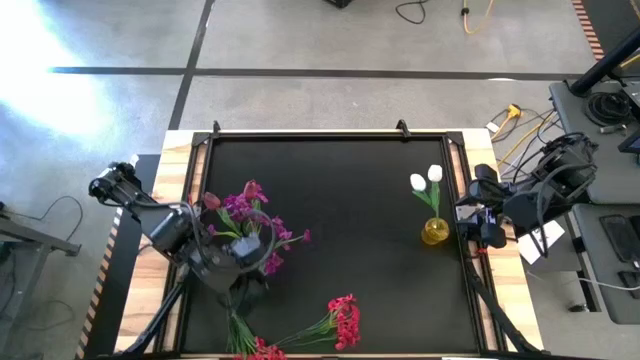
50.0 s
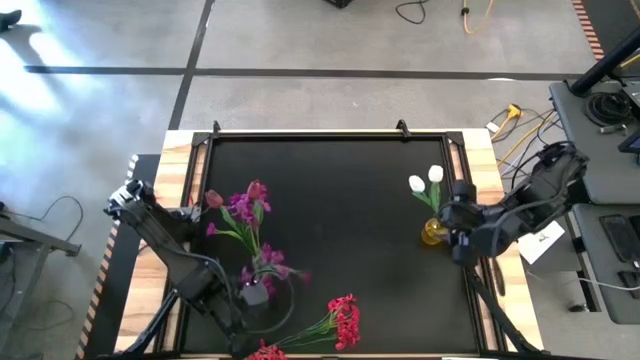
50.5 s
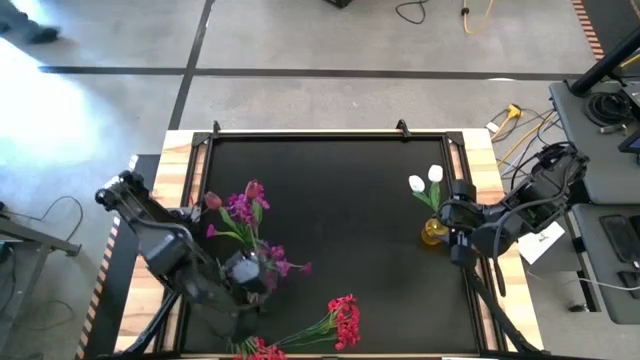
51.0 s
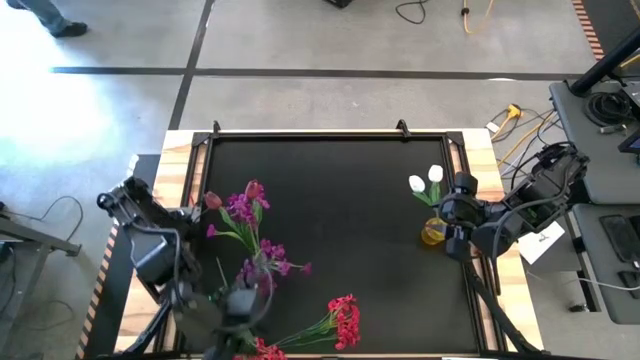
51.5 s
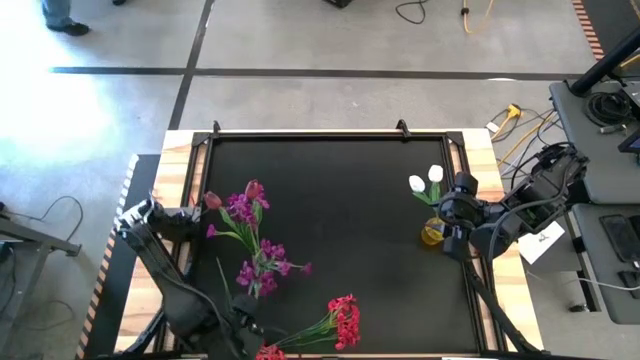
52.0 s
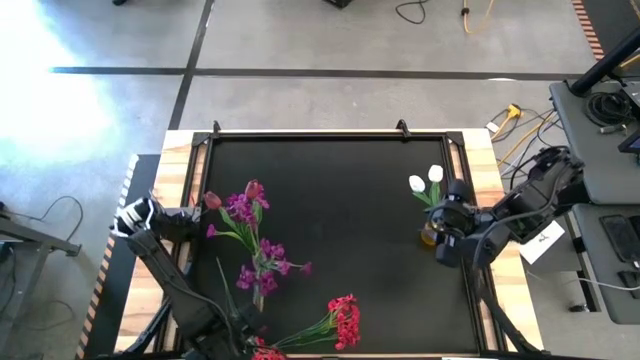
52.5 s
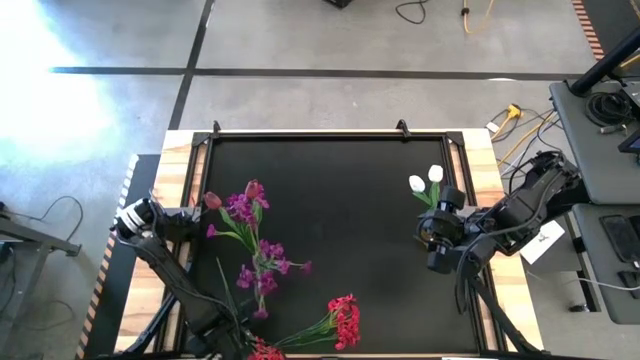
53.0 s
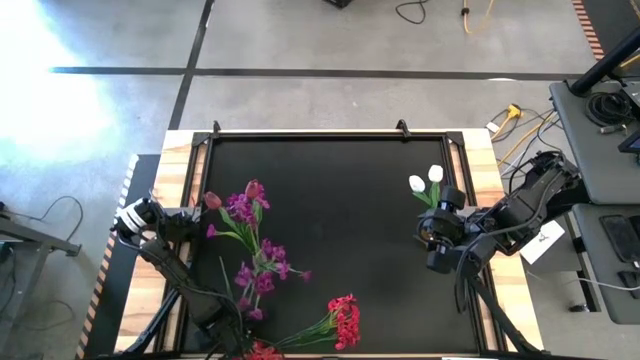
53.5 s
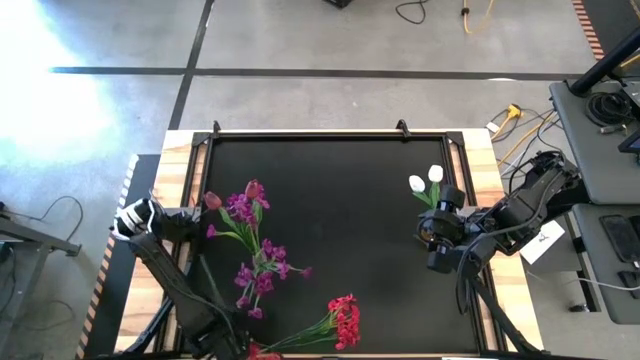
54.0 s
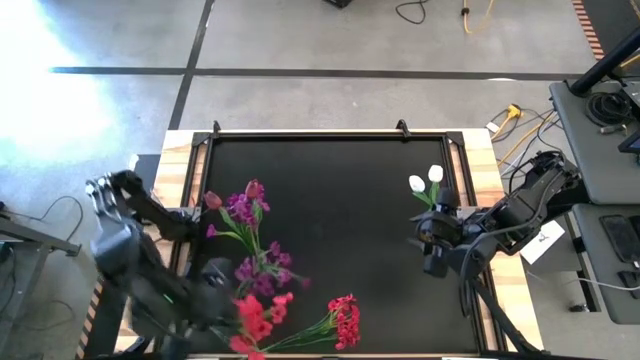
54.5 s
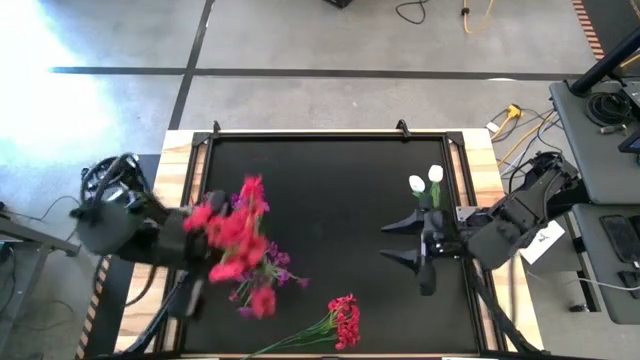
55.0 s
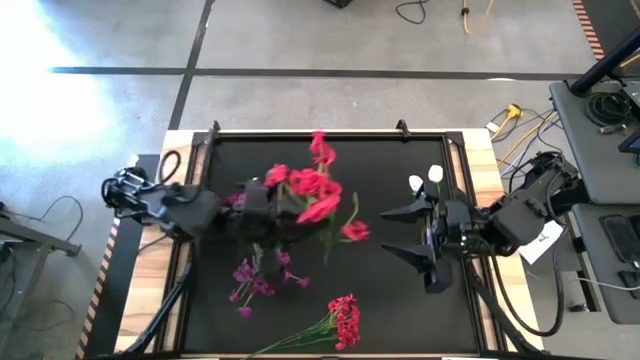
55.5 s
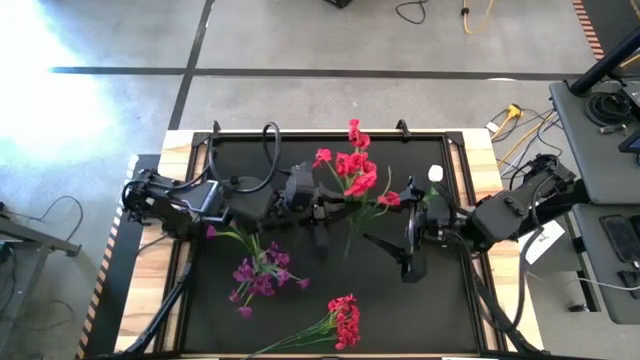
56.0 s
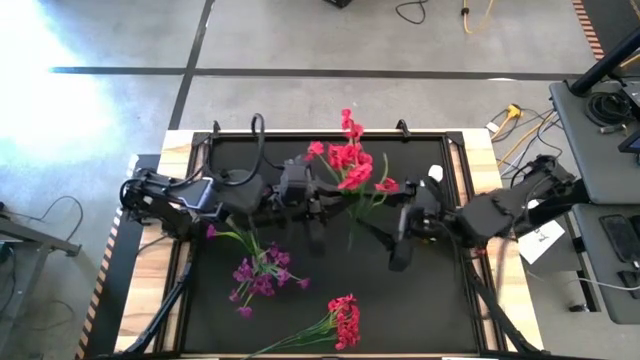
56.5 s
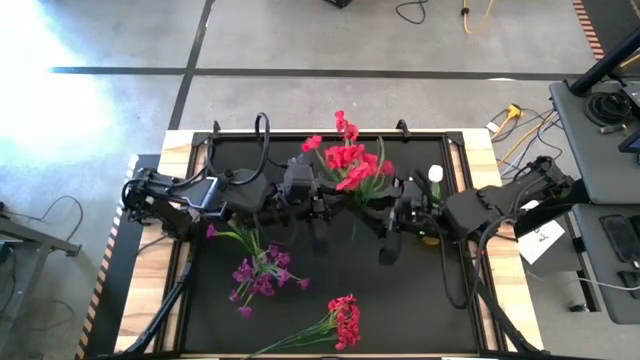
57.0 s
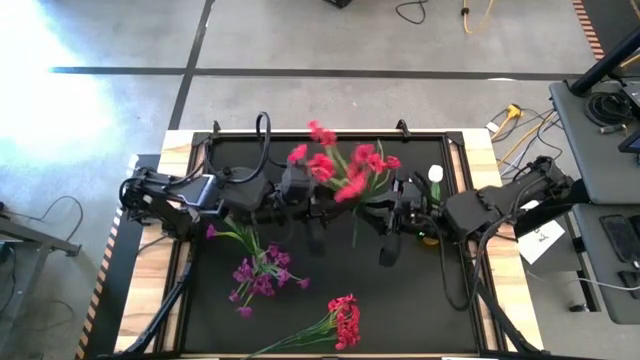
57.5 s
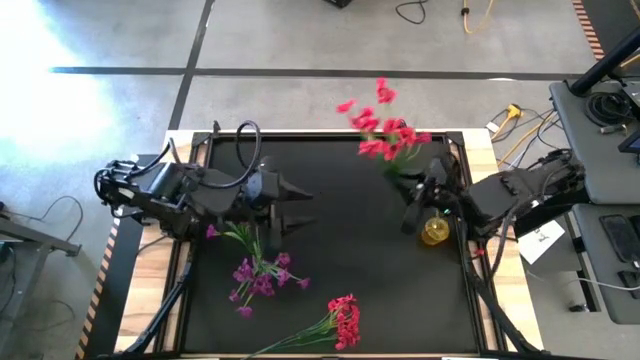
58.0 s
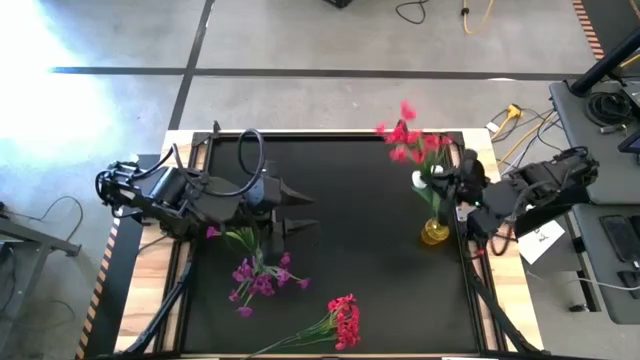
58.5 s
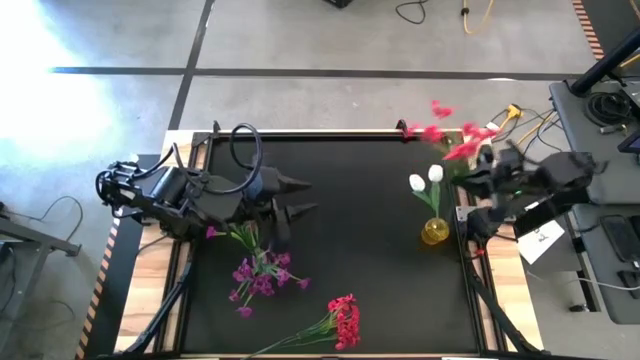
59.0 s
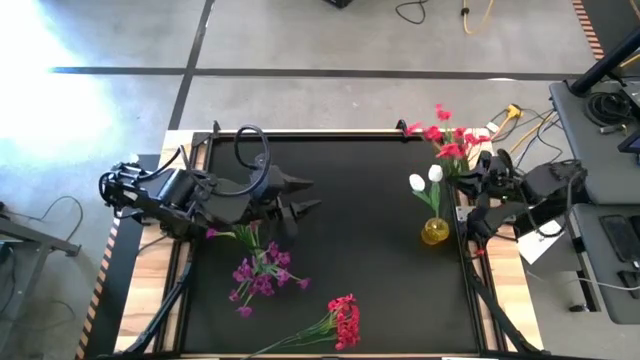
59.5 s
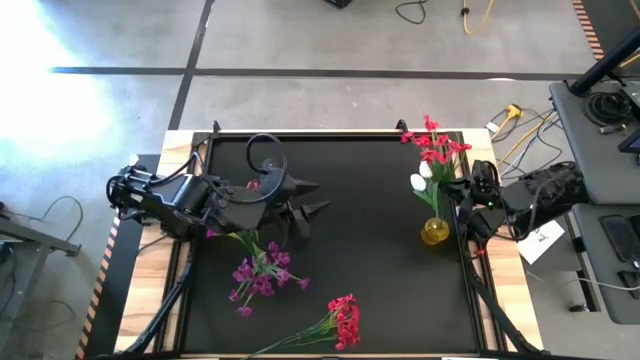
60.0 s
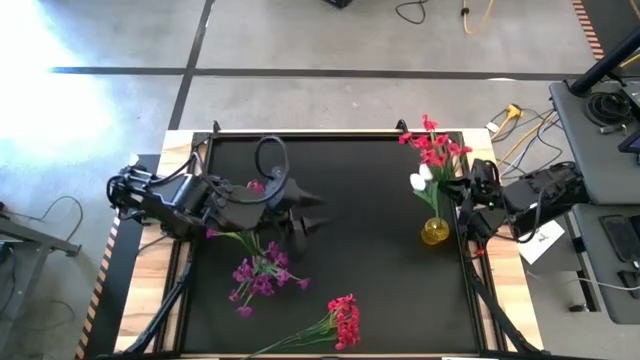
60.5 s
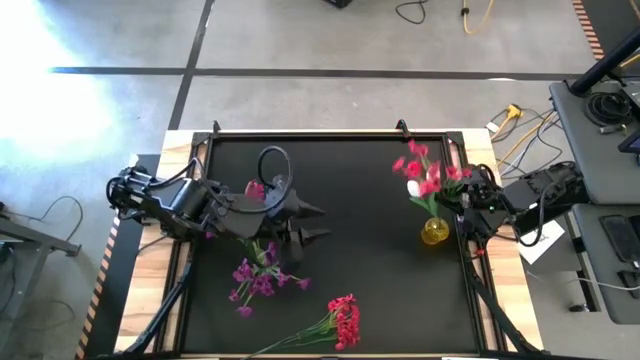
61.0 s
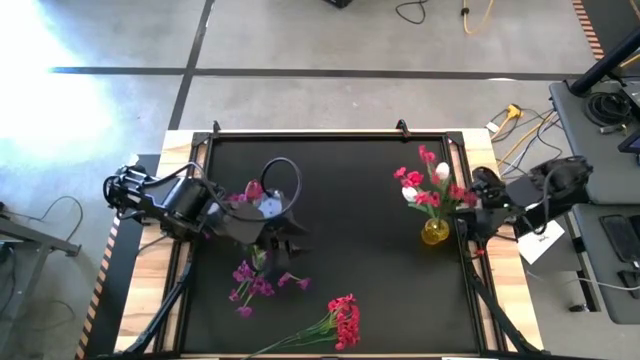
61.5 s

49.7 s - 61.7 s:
Task: Sort flowers into vase by color
Put the left red flower into the yellow flower vase

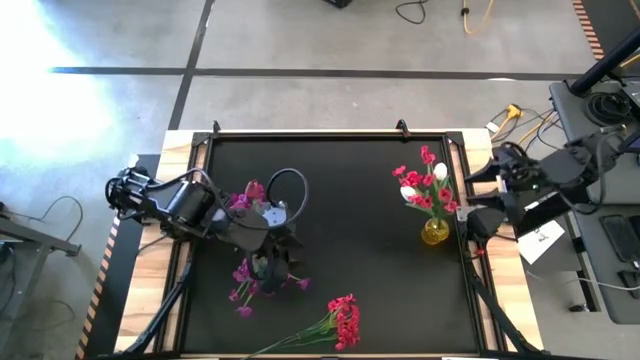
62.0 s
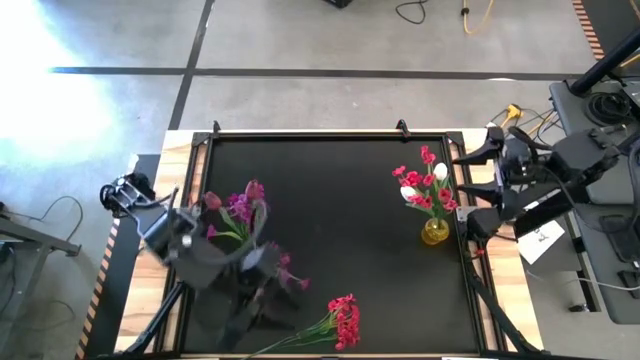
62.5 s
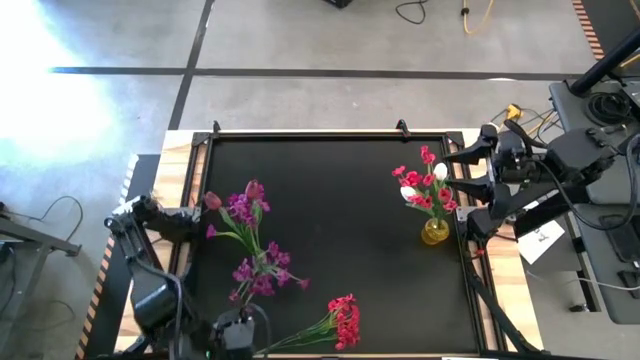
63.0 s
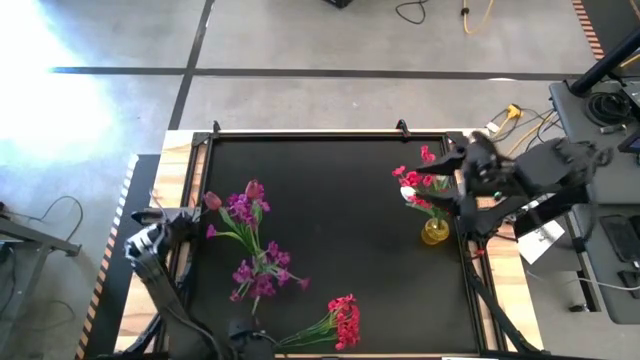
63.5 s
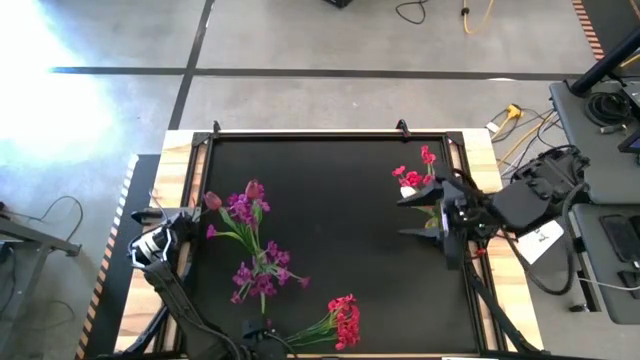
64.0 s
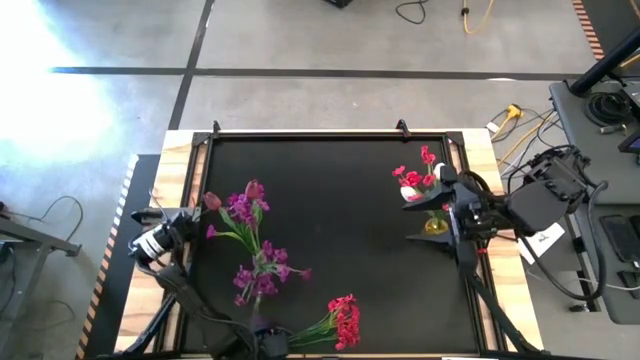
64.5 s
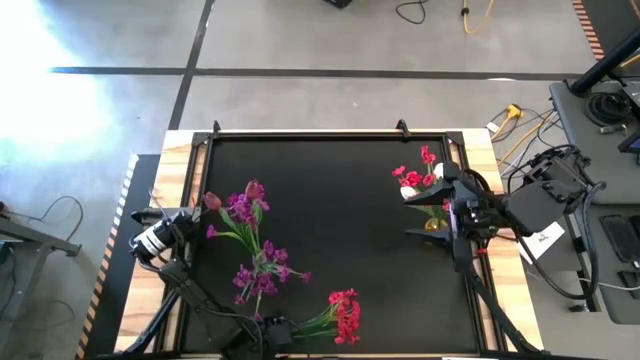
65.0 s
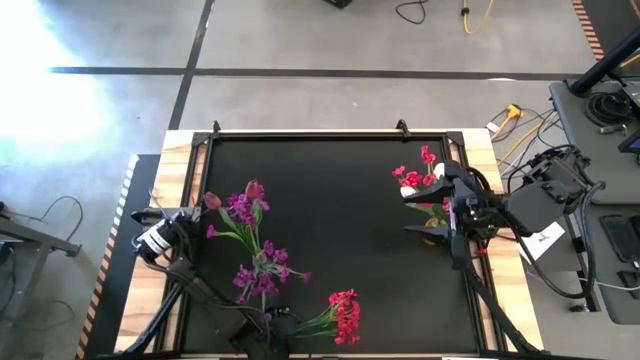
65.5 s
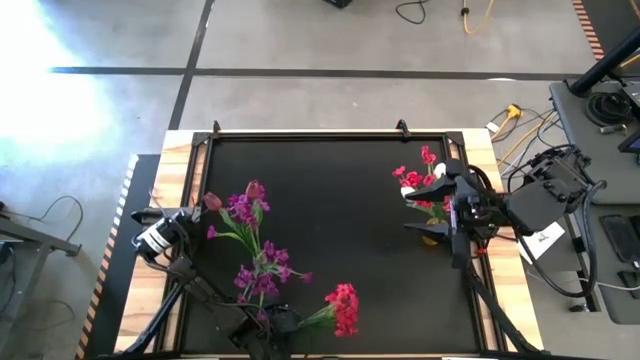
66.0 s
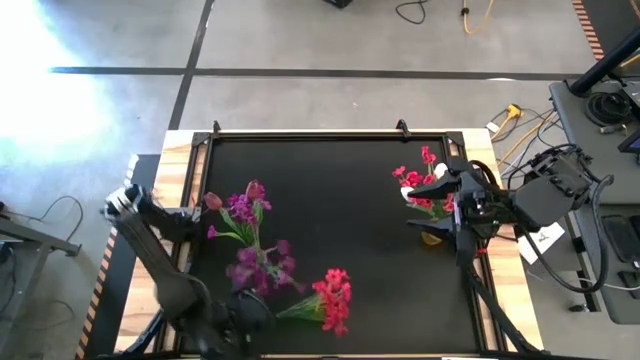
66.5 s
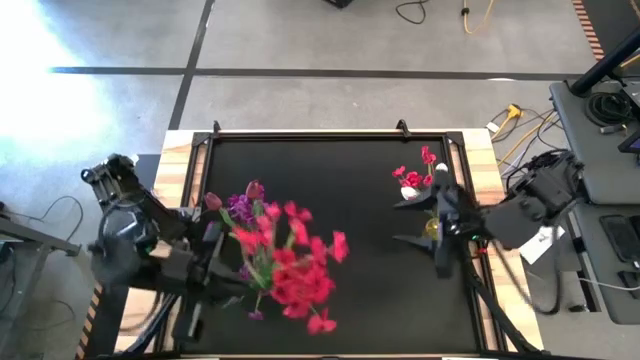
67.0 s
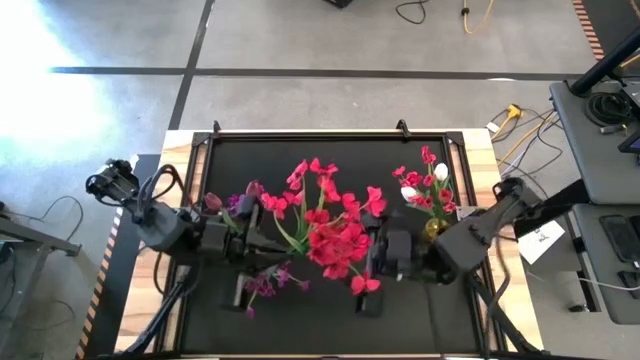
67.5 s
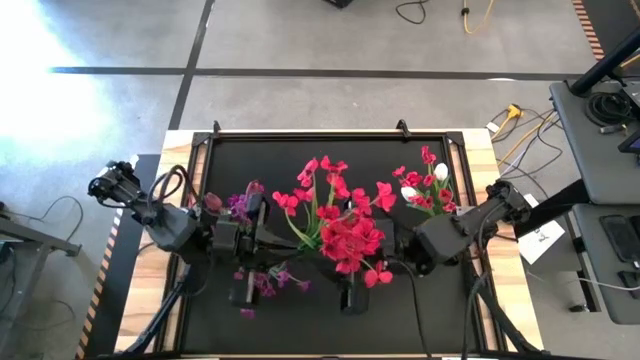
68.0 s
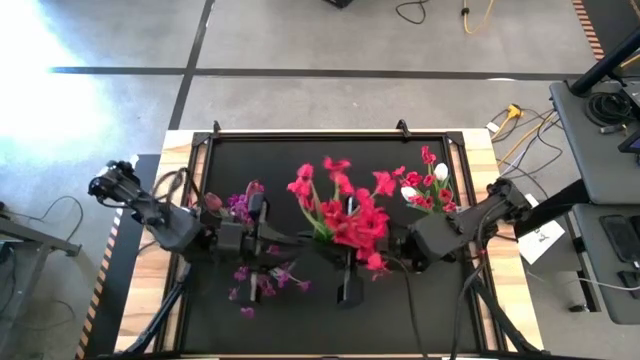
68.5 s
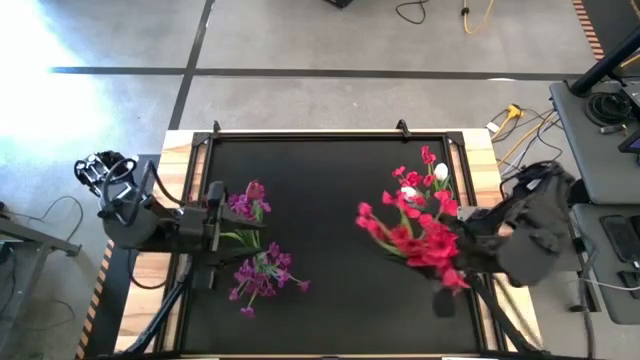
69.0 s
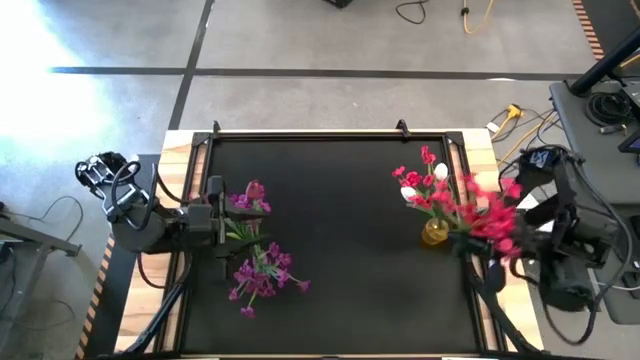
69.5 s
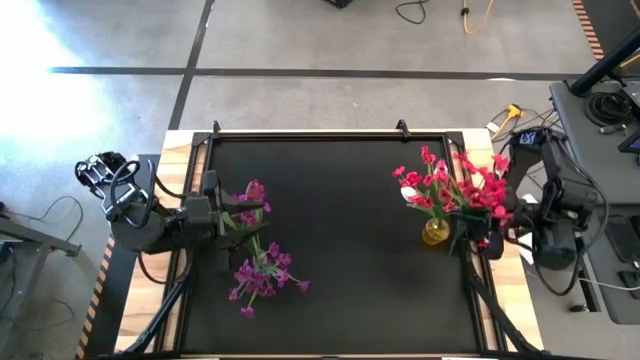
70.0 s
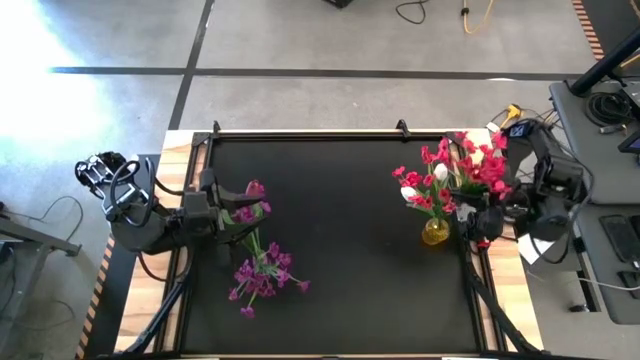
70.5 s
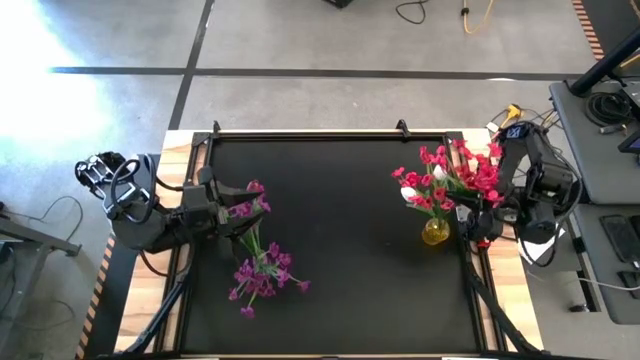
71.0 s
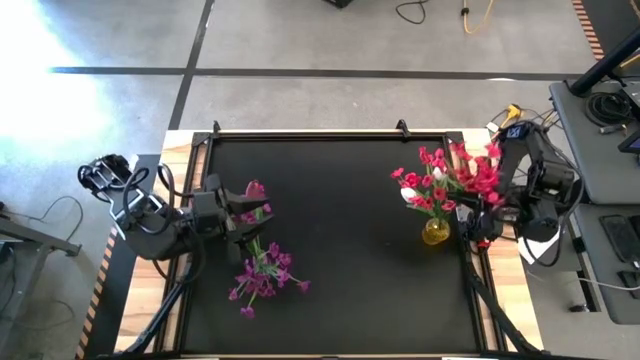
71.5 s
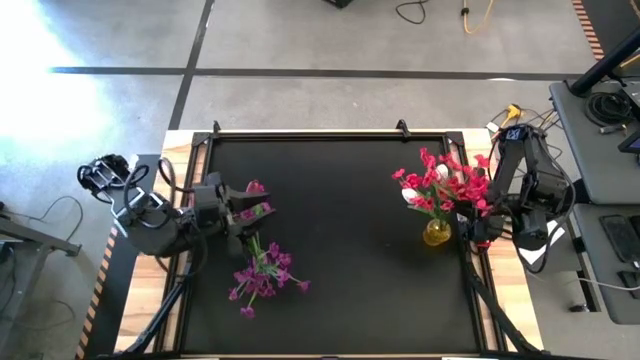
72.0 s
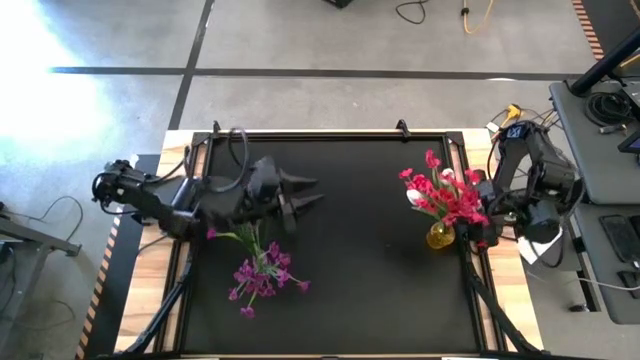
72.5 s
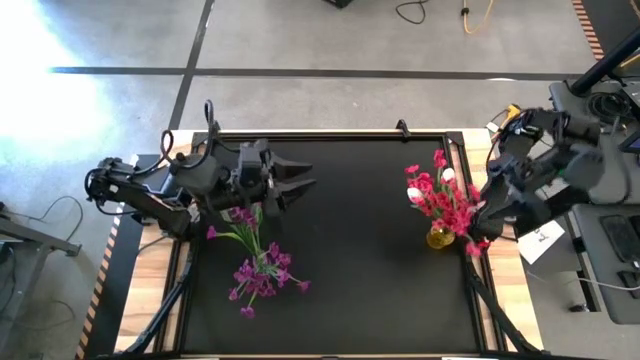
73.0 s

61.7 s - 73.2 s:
Put the red flower into the yellow flower vase
